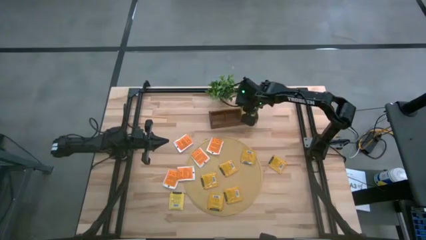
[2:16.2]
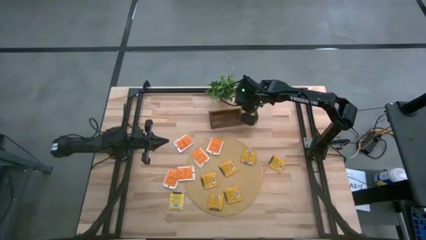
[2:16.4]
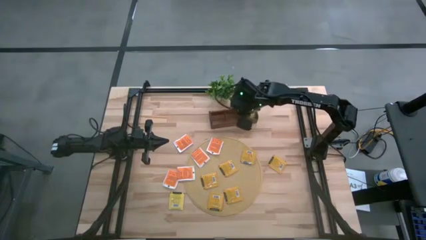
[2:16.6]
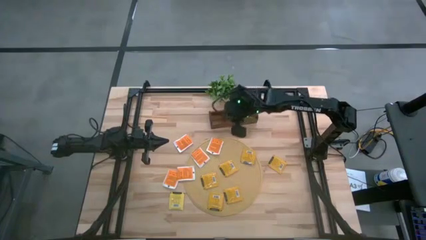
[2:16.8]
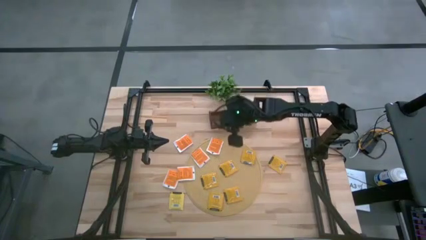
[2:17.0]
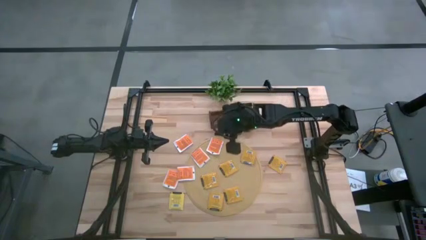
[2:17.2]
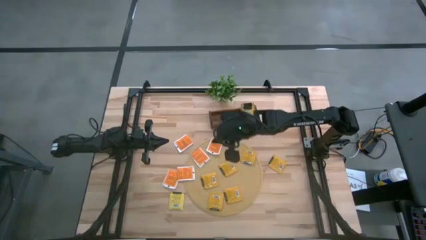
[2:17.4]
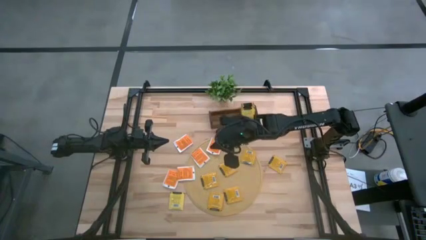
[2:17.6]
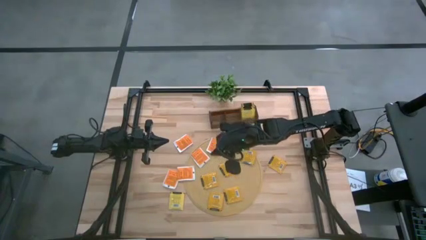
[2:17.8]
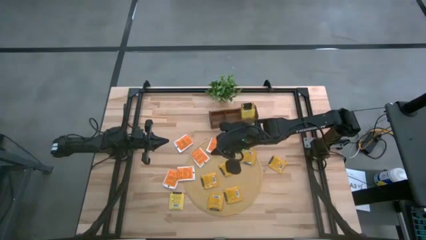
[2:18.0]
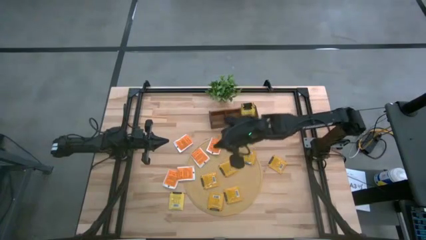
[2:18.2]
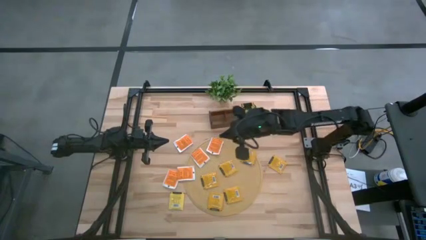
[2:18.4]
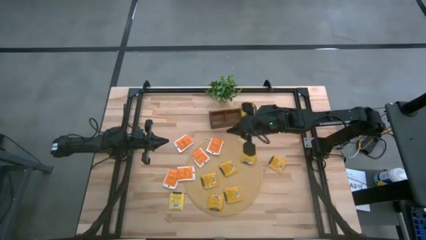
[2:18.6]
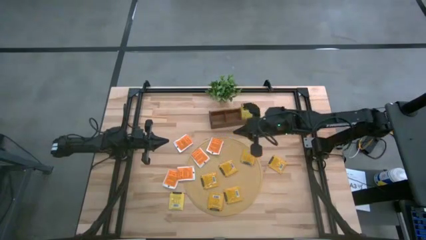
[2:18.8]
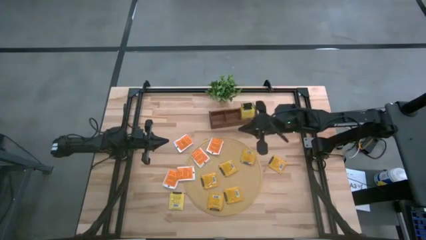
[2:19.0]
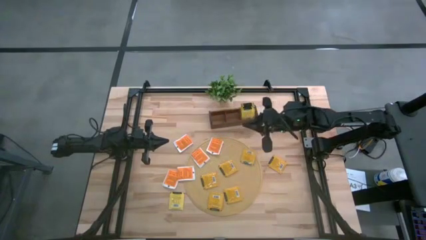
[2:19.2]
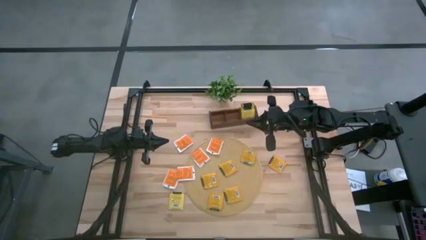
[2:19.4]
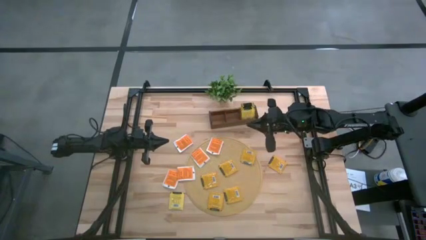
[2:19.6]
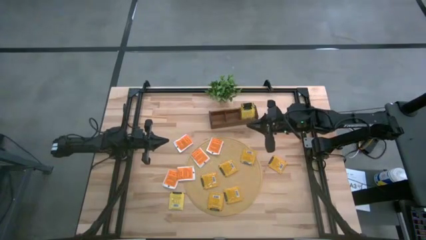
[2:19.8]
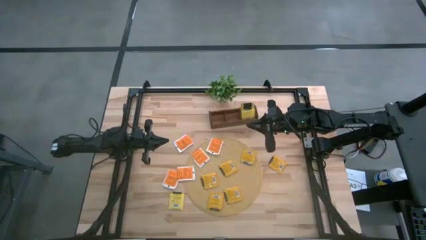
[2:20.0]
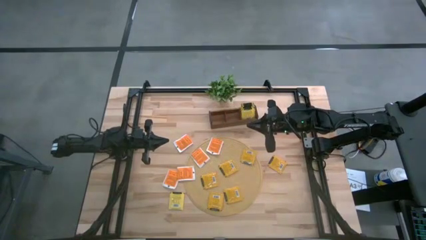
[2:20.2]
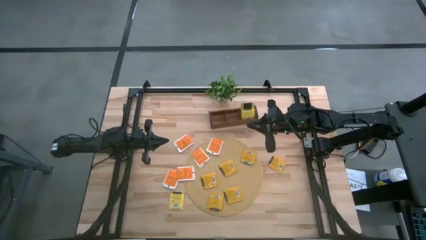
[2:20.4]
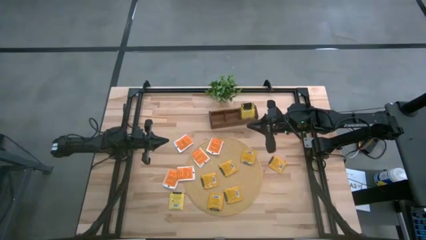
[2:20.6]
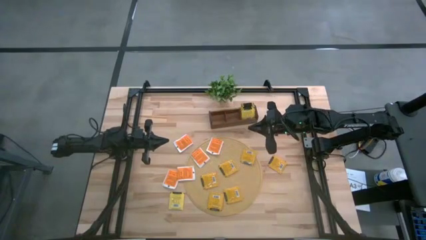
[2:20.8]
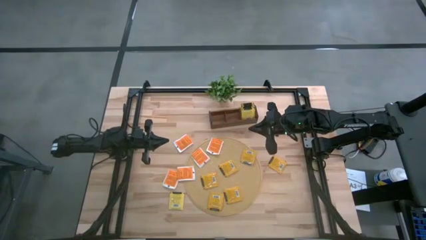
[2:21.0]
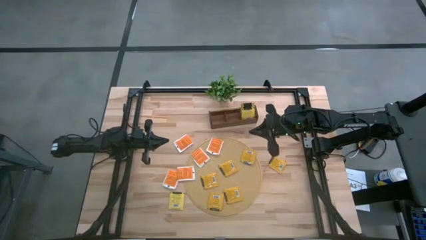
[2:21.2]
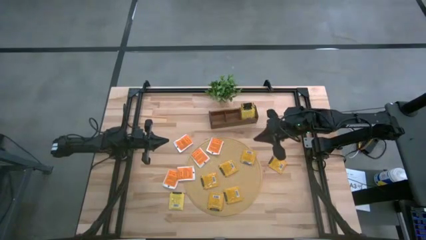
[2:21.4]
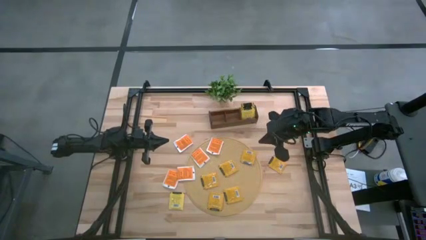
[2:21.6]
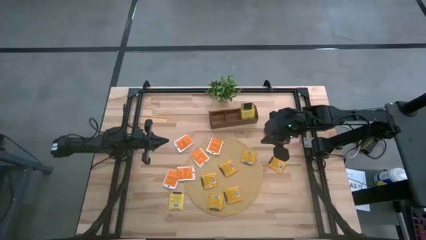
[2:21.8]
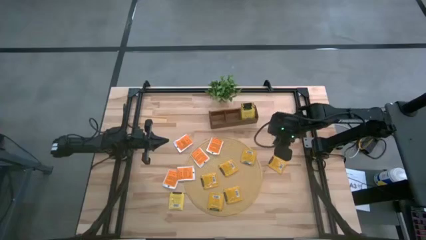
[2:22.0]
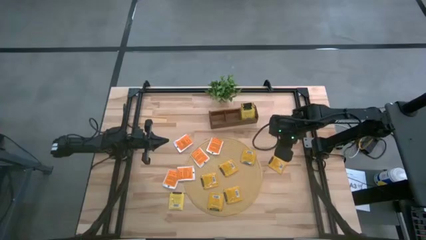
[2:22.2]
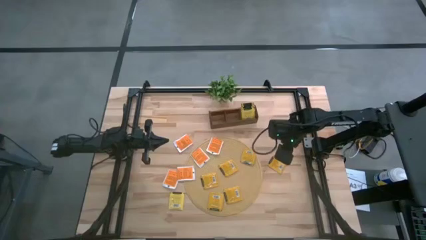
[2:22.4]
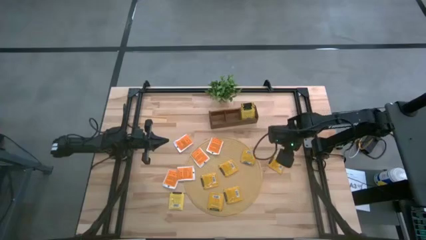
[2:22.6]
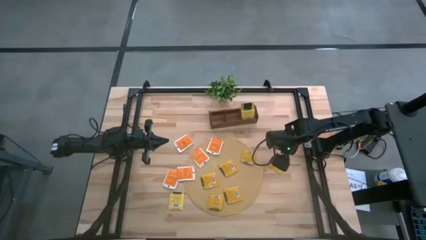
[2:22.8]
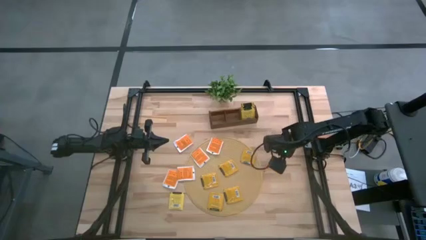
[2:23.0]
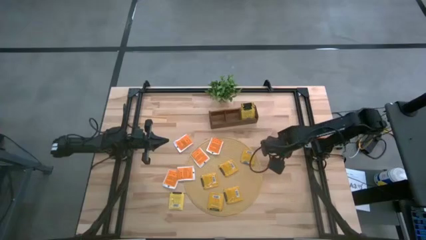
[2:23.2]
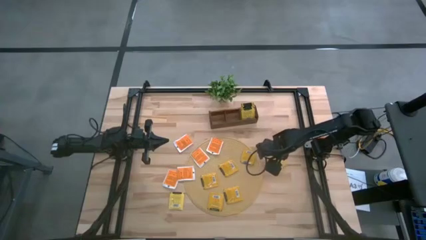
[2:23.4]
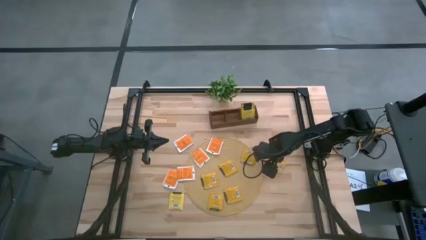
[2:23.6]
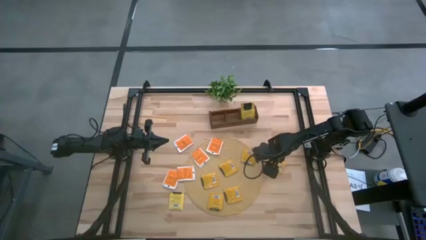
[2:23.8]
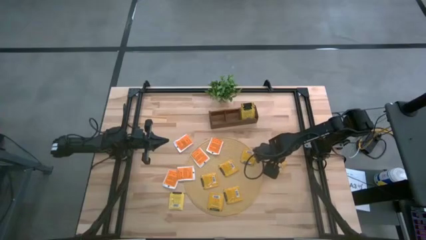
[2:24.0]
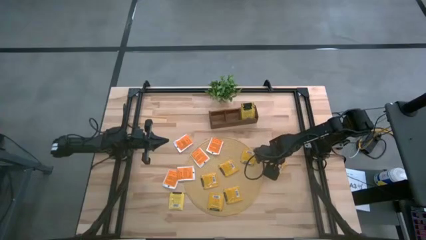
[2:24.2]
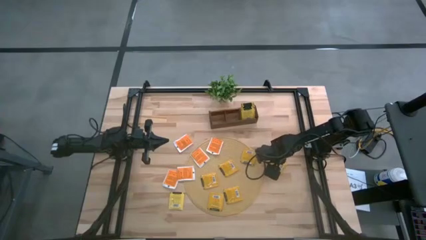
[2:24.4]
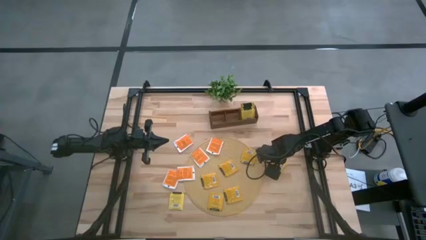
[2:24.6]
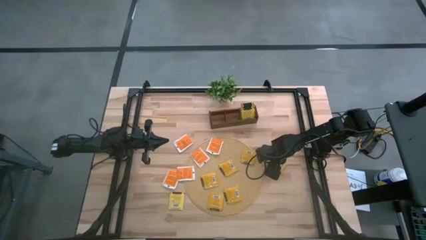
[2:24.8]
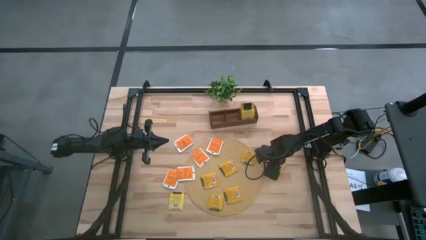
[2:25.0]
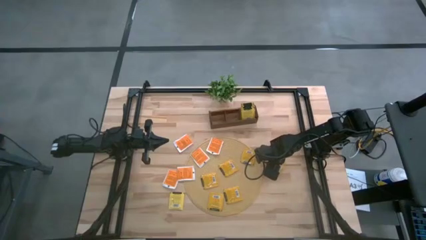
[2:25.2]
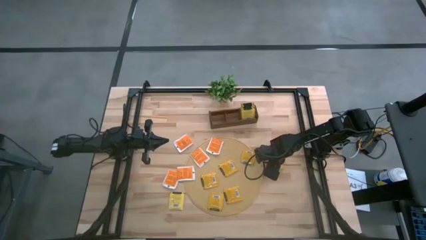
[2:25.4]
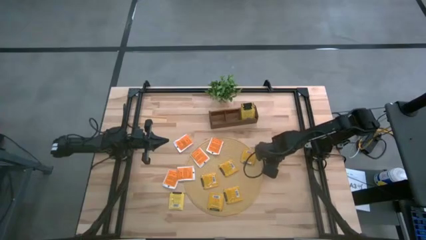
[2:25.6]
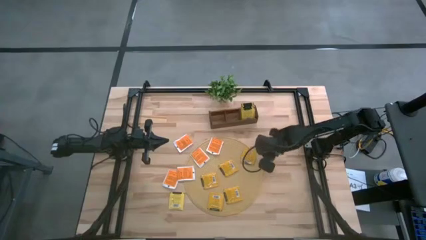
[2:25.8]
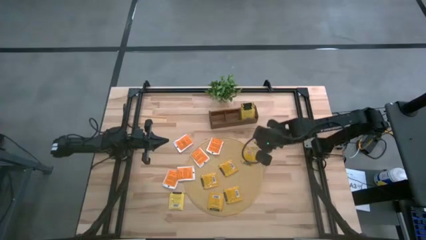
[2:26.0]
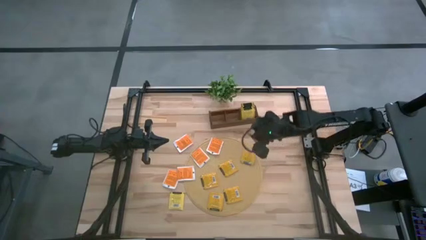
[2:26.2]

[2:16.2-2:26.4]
Task: Pick & Place Tea
Put the orange tea bag into the middle section of the wooden organizer

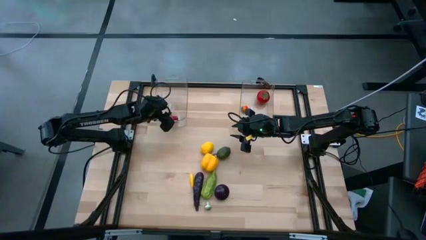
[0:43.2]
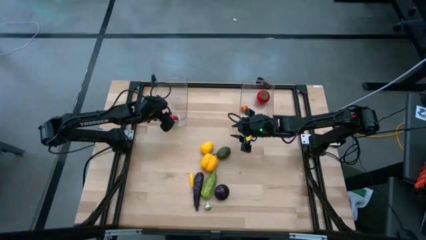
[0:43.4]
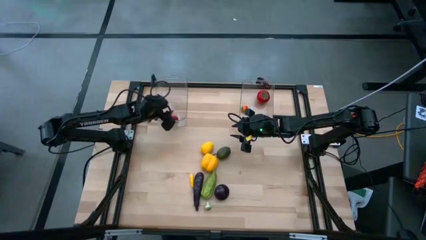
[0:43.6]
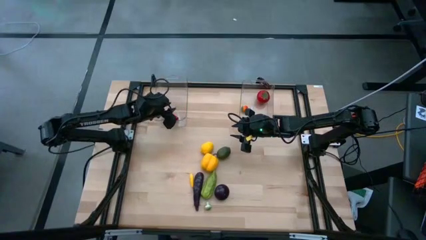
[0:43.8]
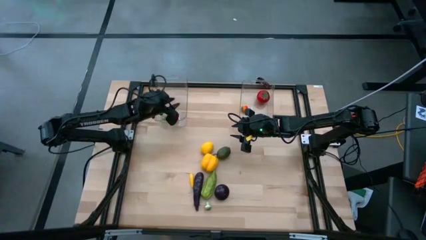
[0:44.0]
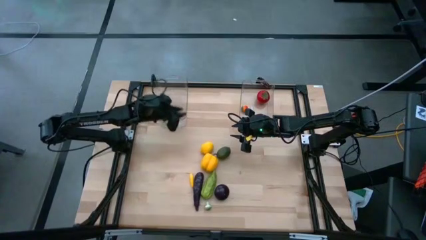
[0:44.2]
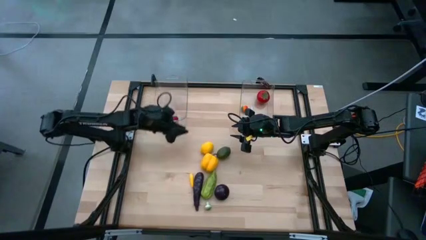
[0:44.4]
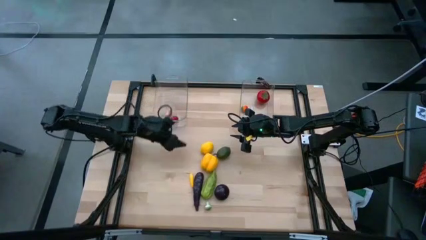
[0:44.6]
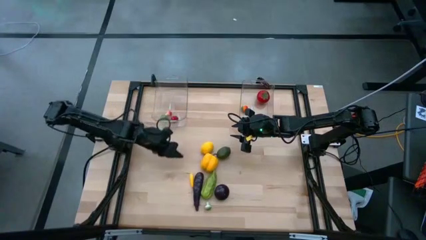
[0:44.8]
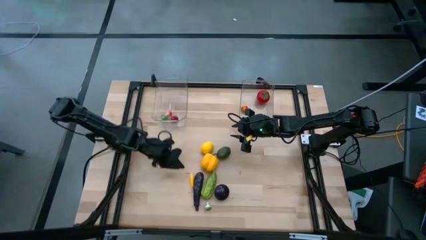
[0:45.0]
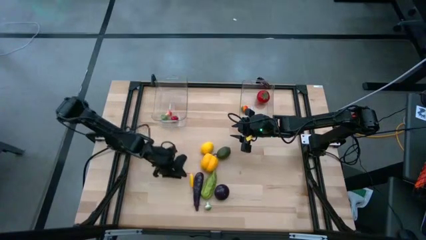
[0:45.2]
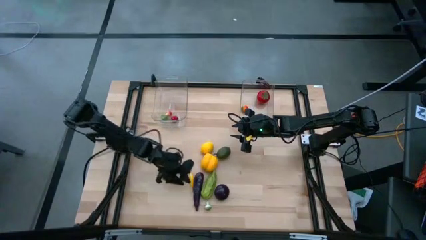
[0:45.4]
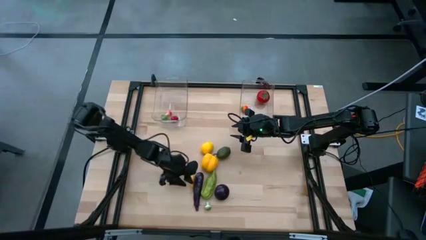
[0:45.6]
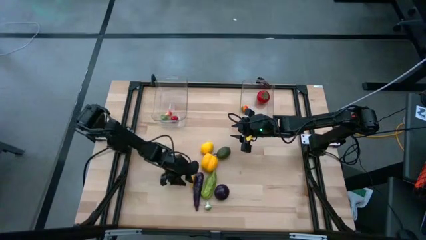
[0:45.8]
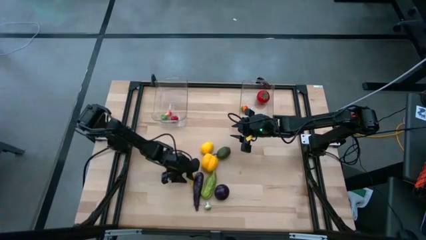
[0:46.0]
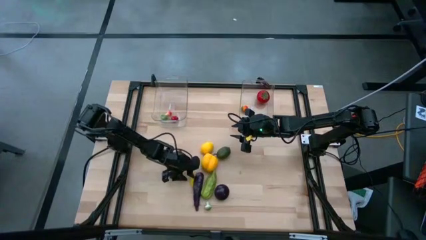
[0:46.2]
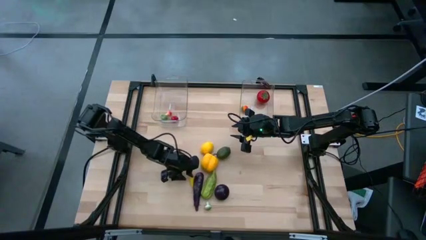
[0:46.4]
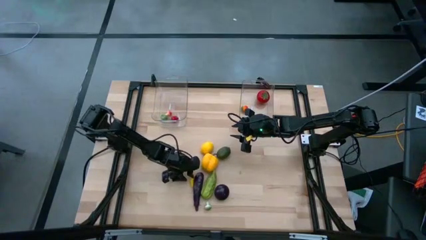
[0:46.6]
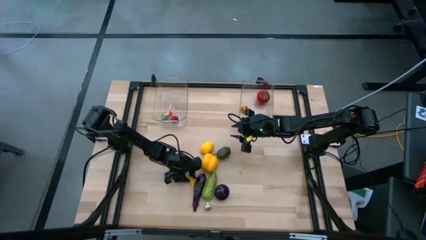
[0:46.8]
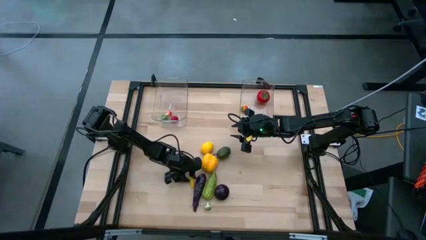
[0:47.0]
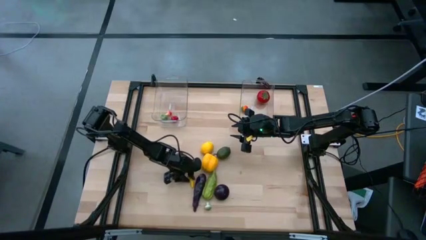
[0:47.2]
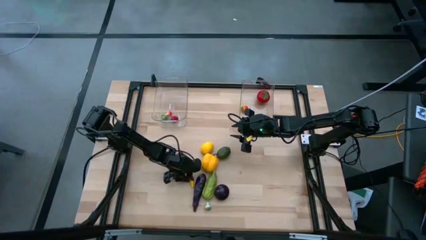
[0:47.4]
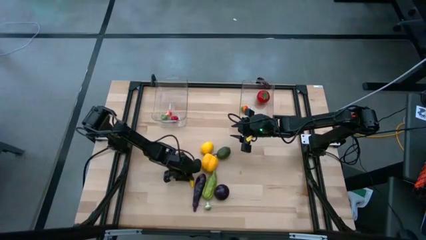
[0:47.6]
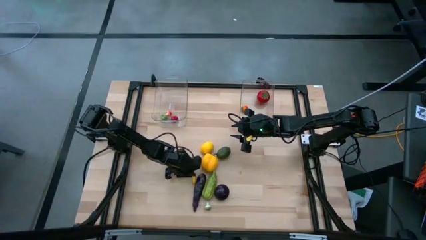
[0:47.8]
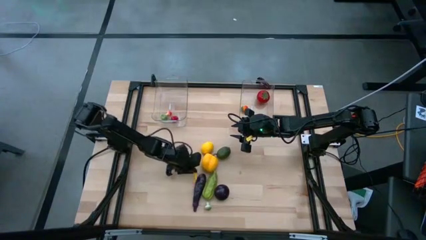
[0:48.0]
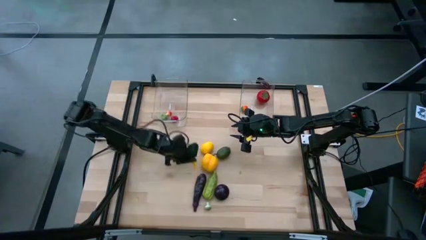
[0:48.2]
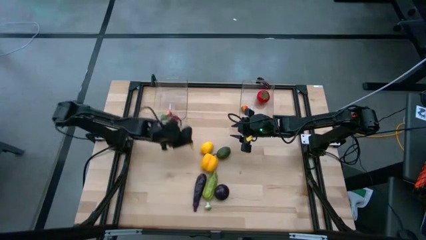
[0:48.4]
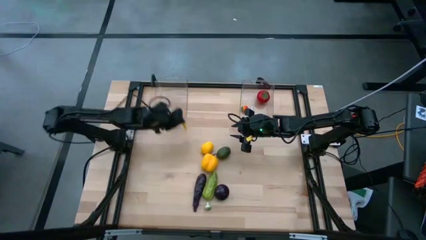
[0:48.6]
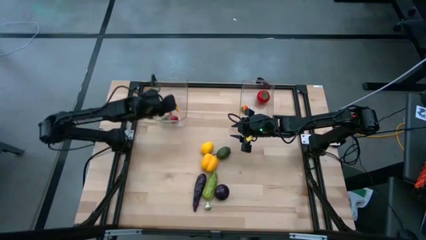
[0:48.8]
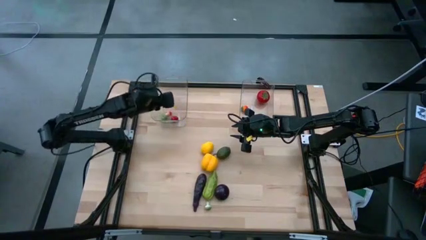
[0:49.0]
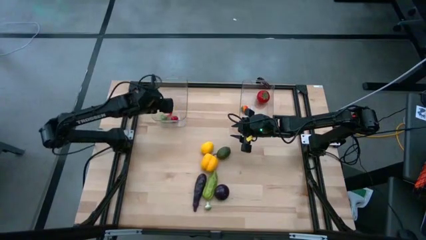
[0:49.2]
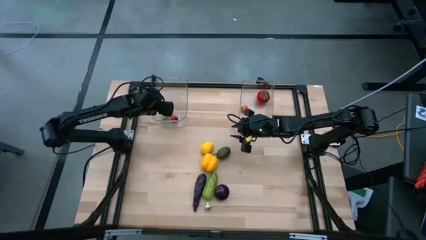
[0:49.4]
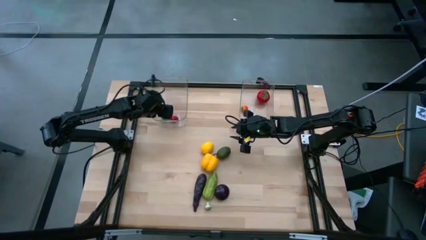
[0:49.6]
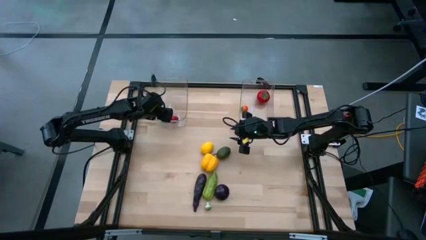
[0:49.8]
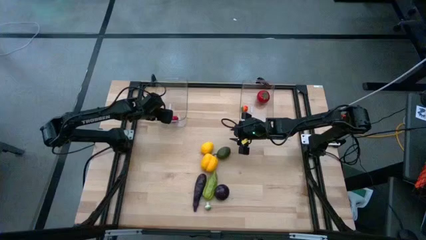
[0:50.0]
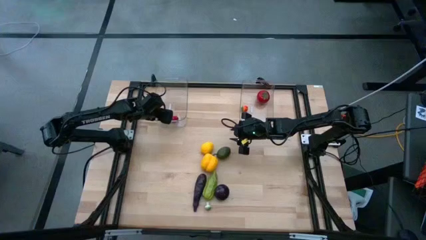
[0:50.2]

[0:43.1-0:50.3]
Task: Sort produce into baskets
Put the yellow corn into the left transparent bin
